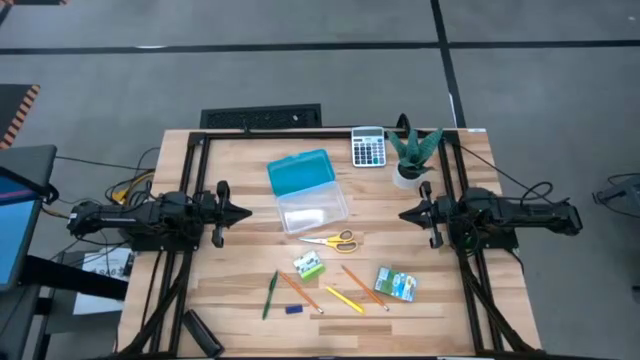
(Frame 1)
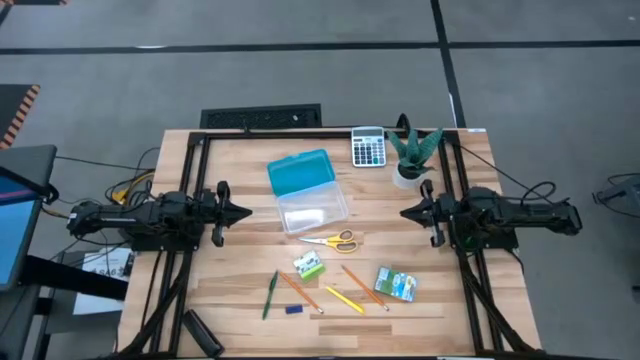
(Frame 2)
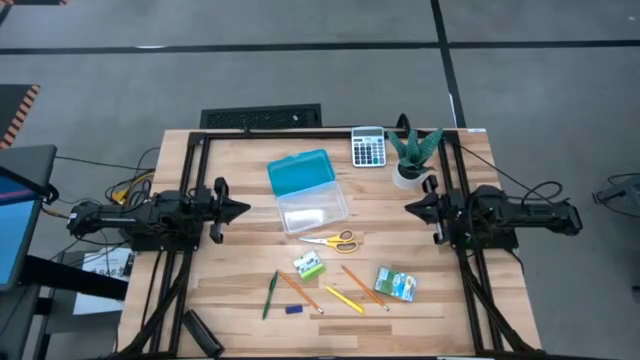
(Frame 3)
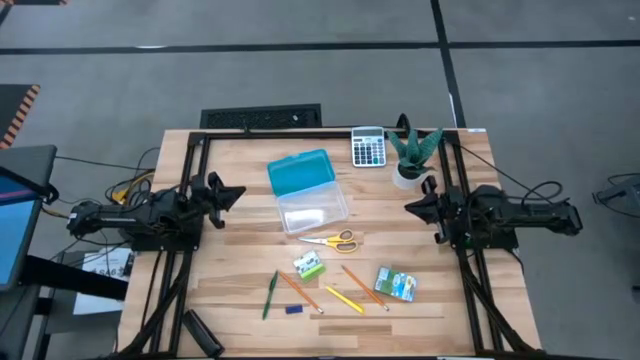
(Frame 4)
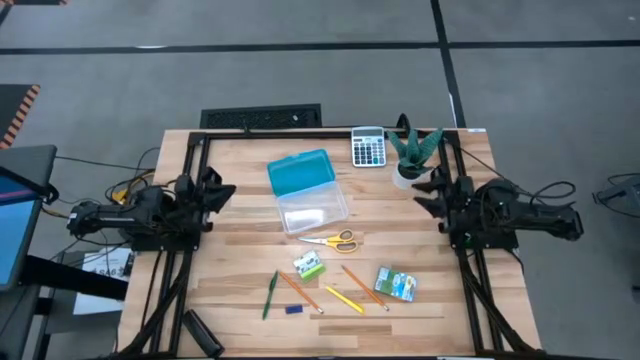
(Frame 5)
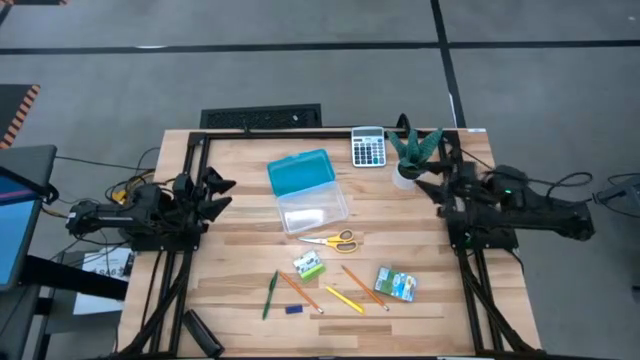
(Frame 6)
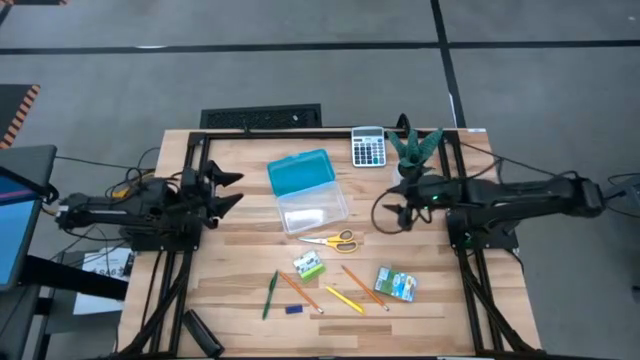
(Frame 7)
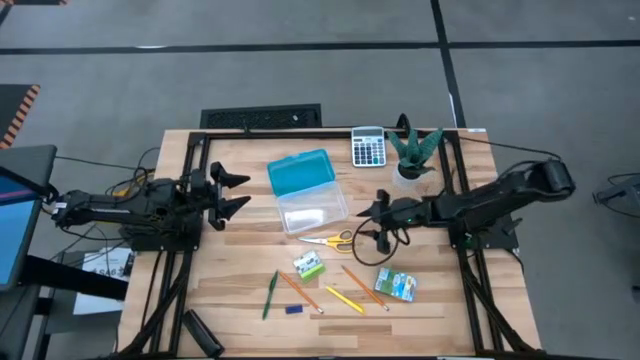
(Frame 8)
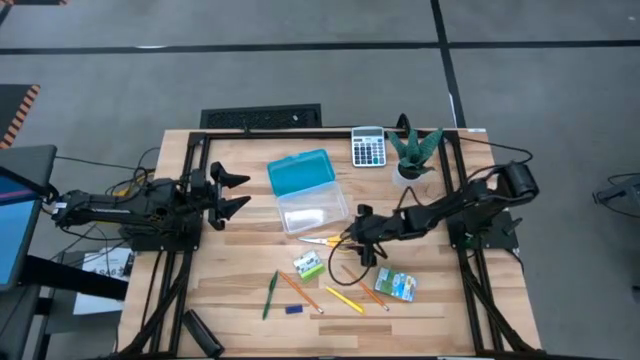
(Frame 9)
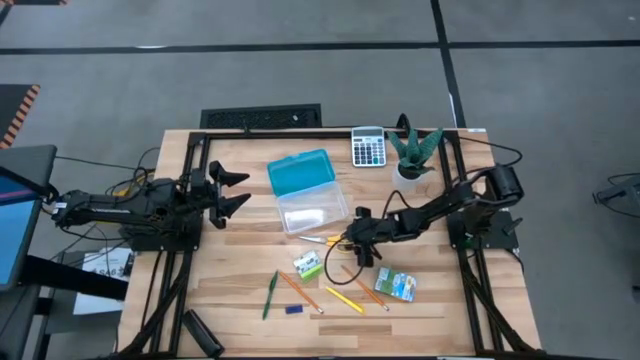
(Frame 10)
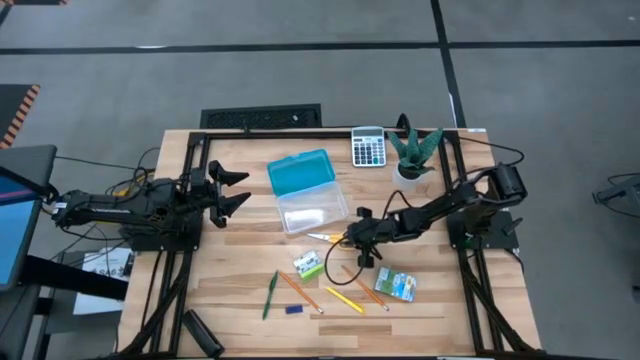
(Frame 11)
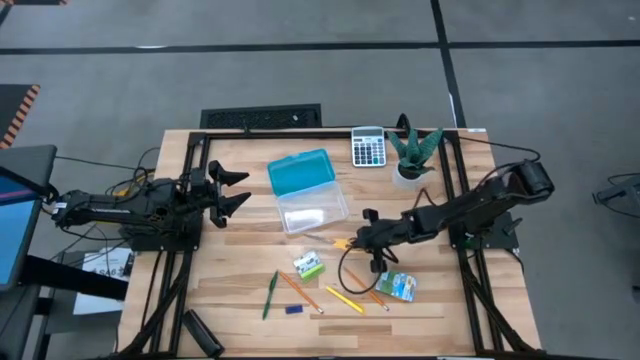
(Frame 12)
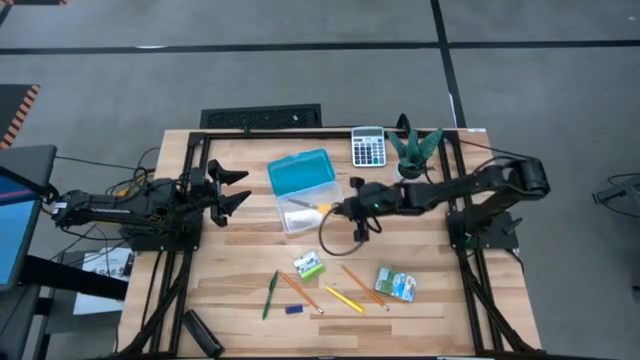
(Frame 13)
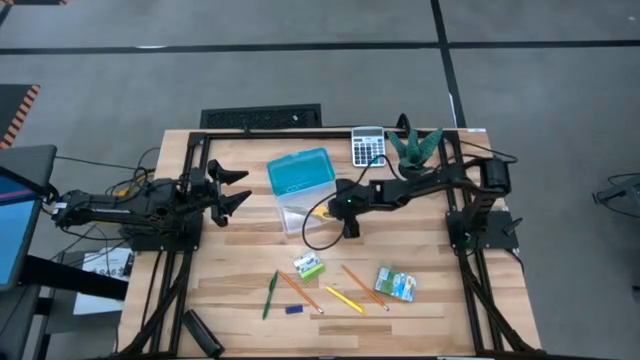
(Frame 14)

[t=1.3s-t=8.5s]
Task: Pack school essentials
Put the yellow scissors into the supply box

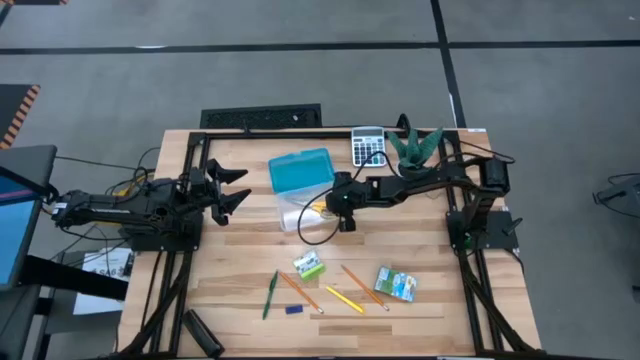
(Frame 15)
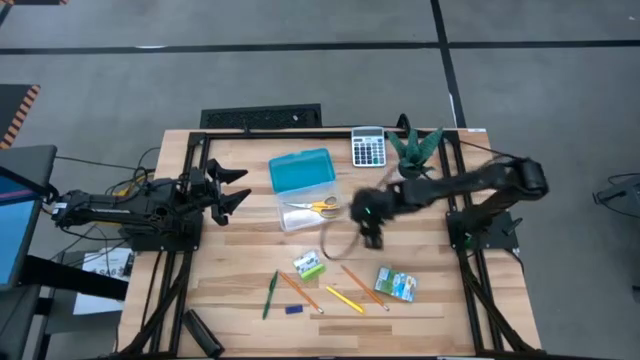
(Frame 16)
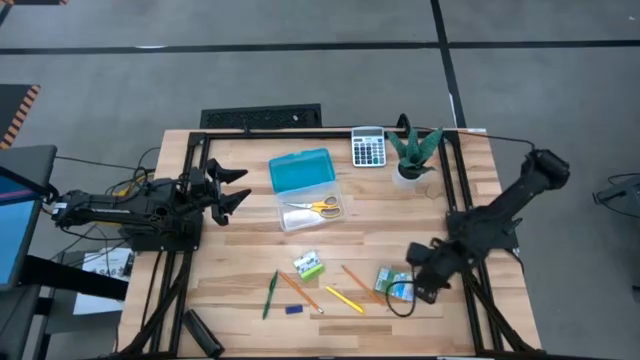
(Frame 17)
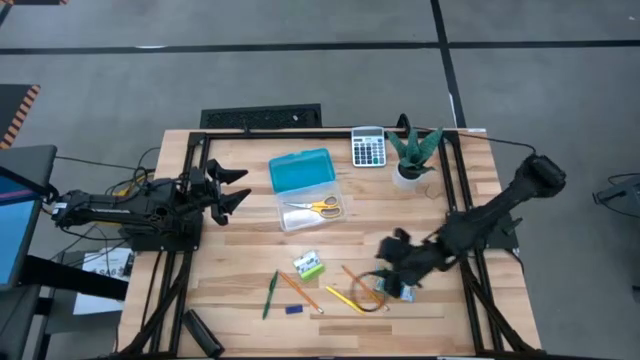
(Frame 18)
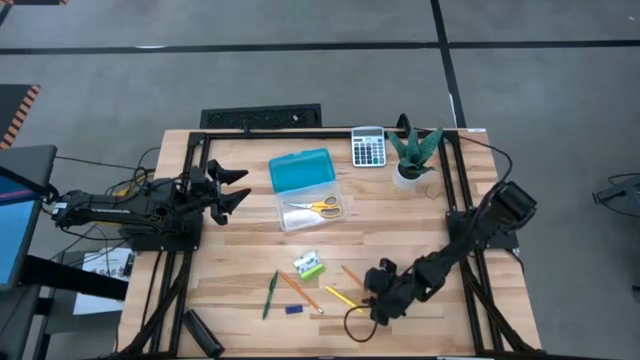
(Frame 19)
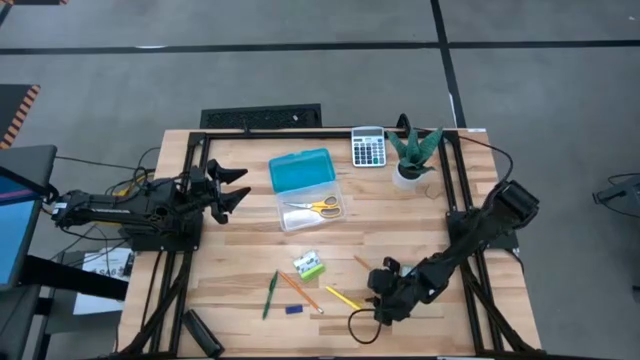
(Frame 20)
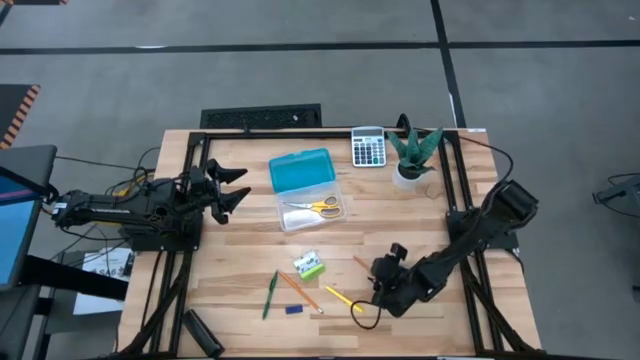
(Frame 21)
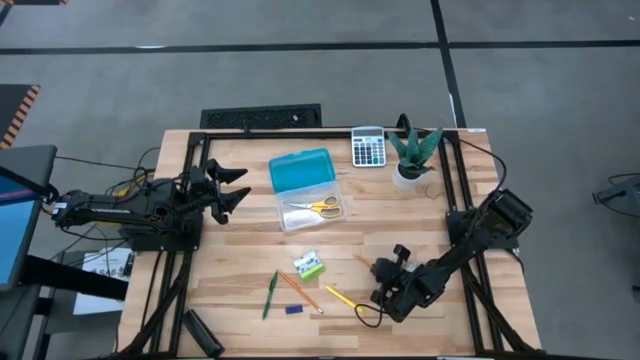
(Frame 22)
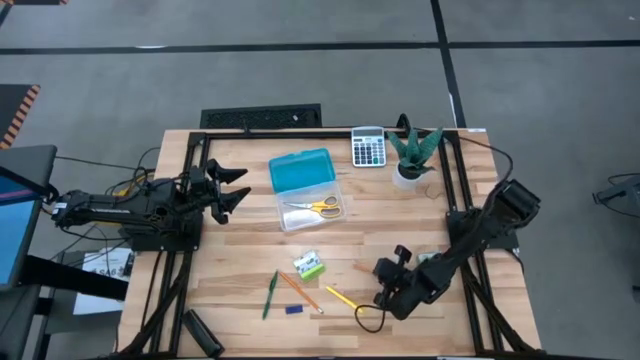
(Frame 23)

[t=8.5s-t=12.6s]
Put the right orange pencil into the supply box

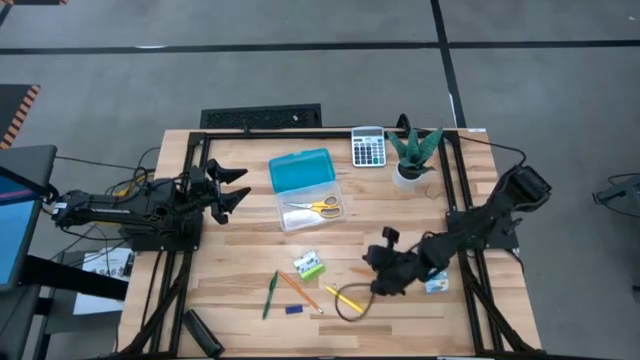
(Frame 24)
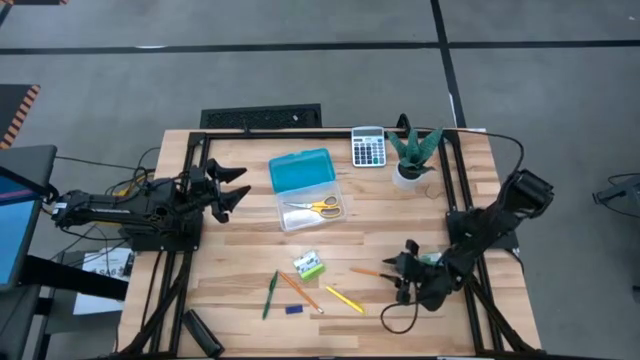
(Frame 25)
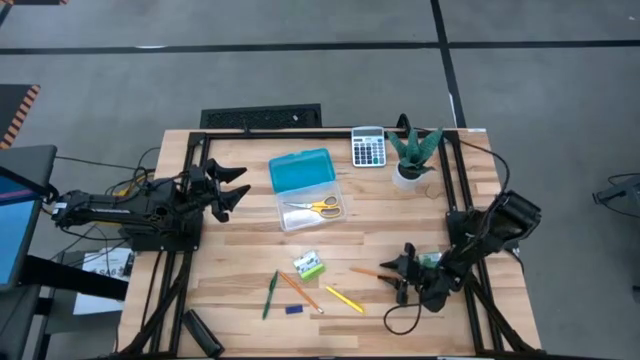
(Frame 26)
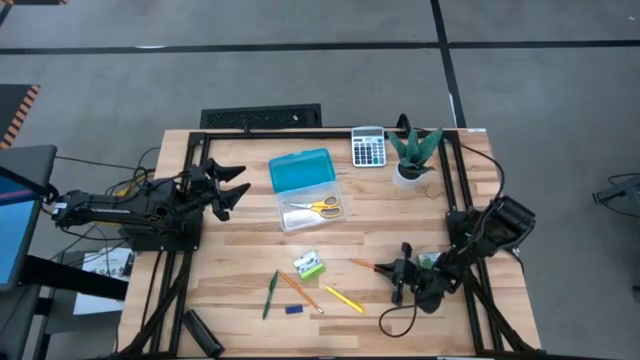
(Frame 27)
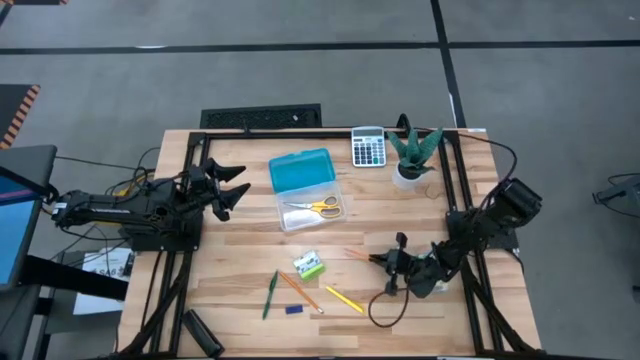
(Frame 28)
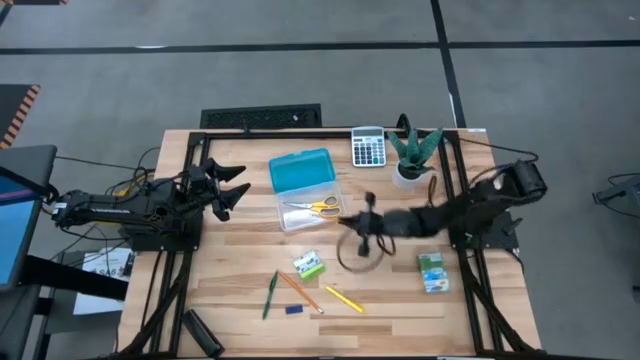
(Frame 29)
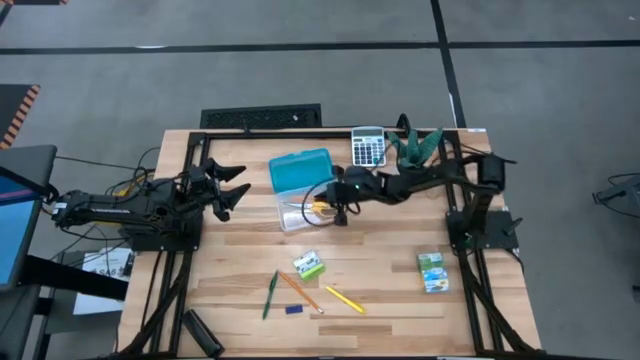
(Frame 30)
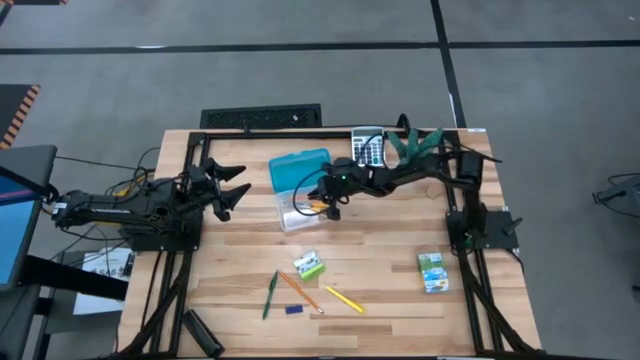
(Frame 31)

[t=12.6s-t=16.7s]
Put the right orange pencil into the supply box

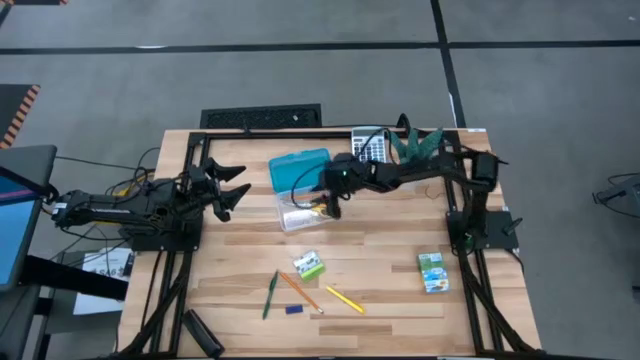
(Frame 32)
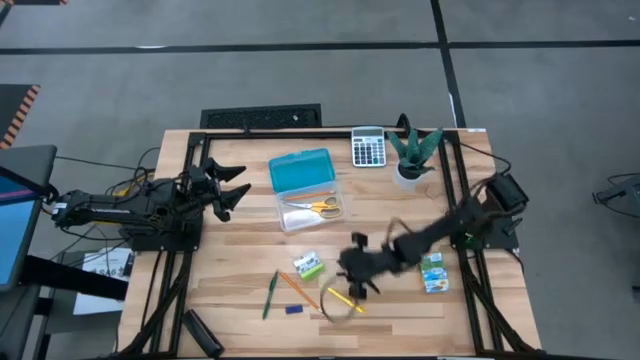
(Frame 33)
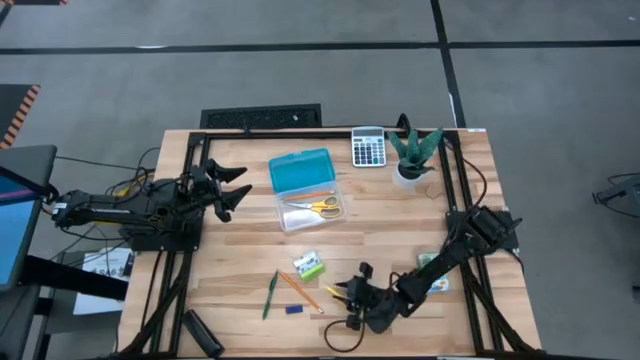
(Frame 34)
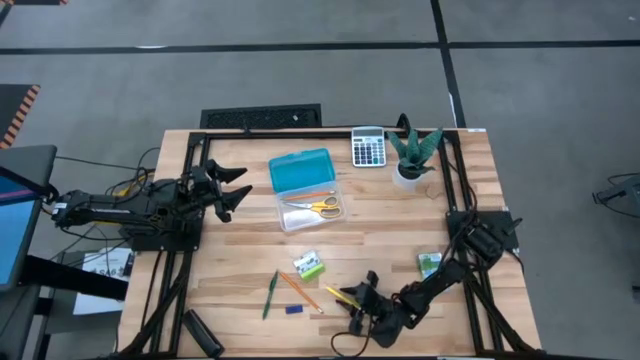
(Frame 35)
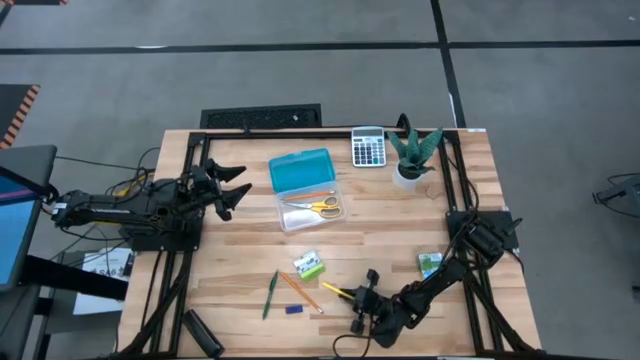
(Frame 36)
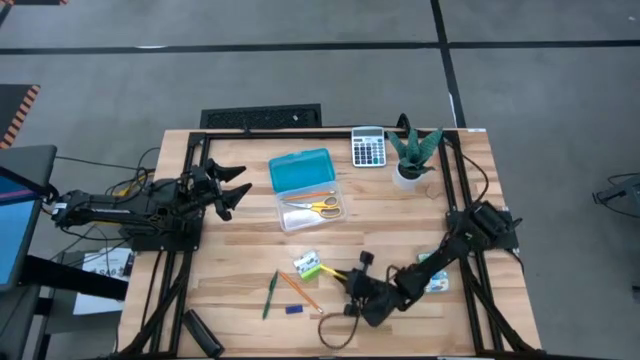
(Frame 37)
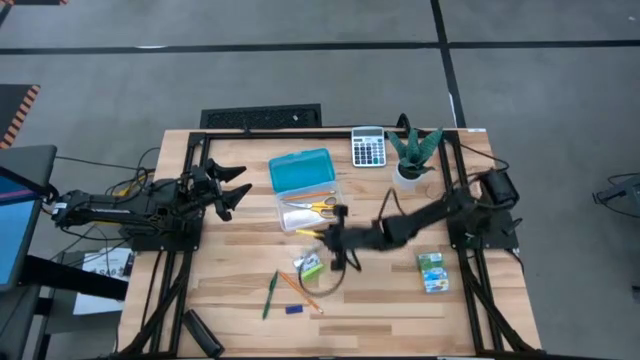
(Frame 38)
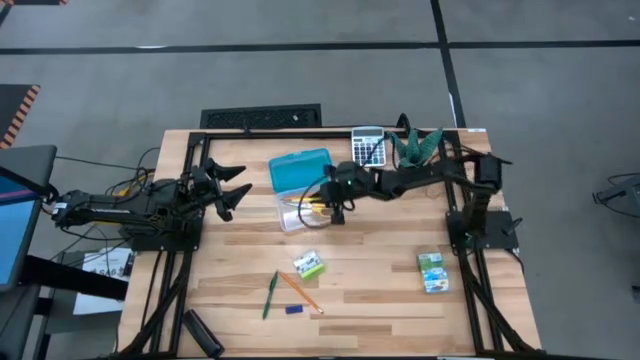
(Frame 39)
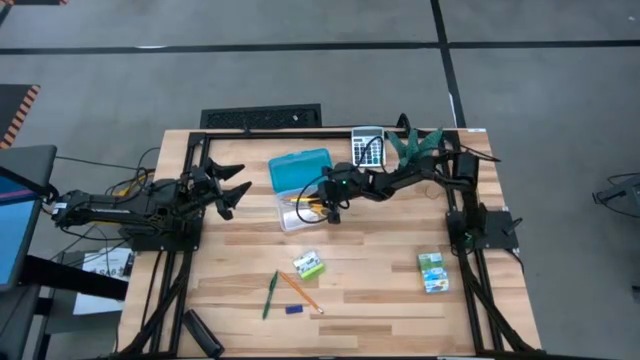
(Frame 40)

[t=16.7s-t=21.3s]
Put the yellow pen into the supply box
